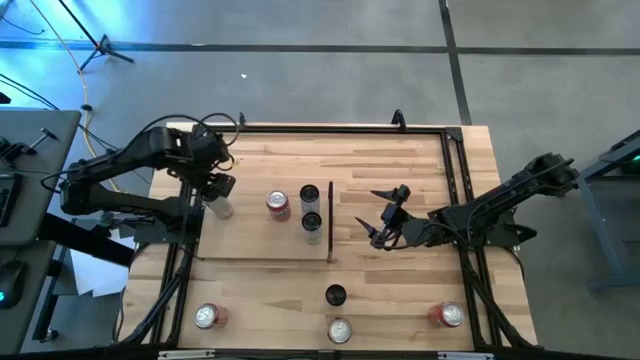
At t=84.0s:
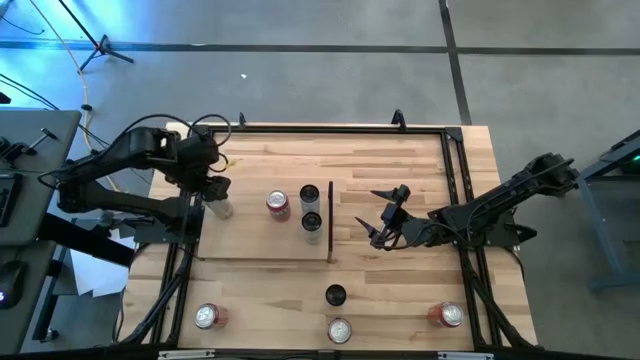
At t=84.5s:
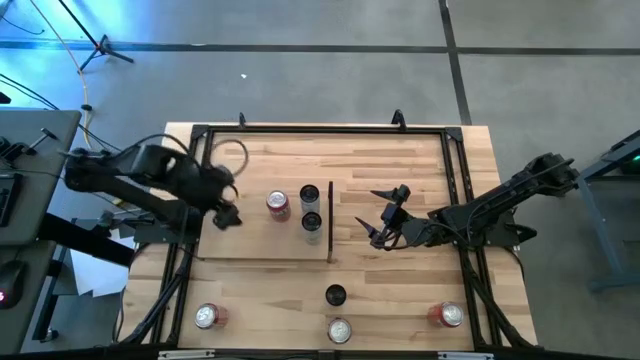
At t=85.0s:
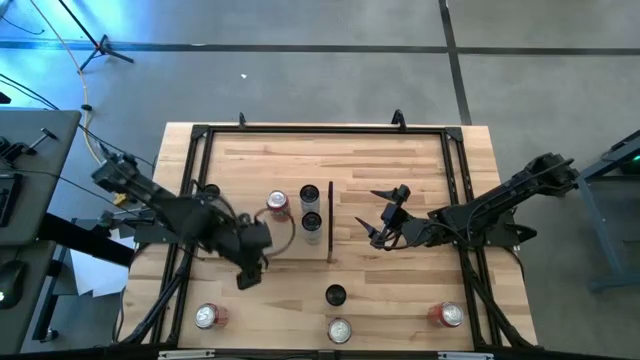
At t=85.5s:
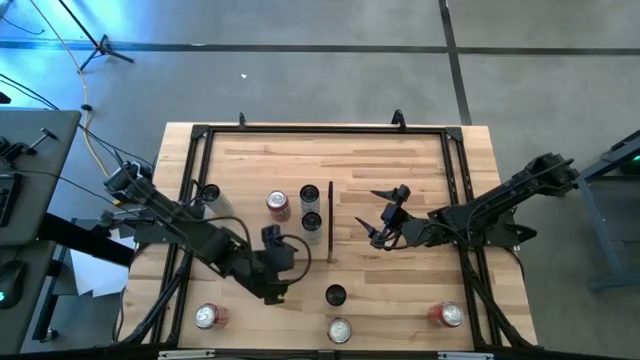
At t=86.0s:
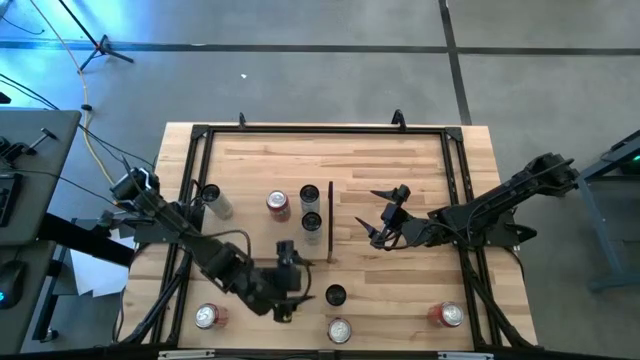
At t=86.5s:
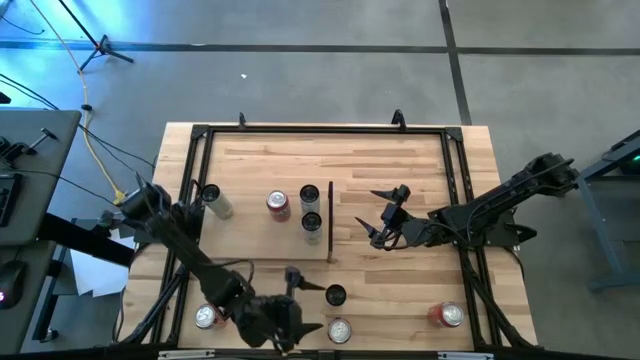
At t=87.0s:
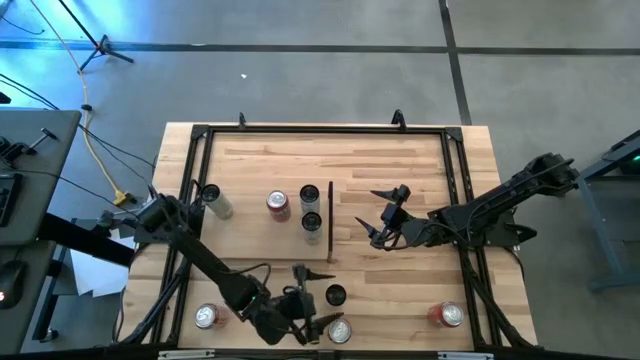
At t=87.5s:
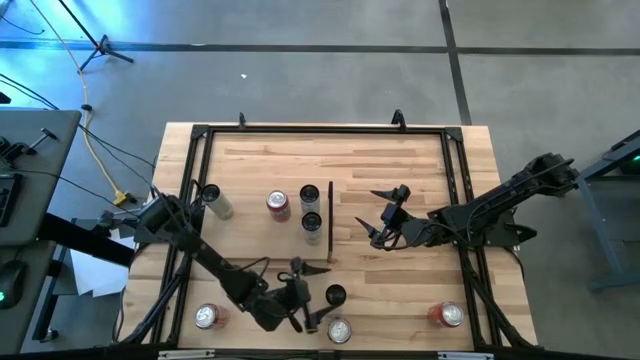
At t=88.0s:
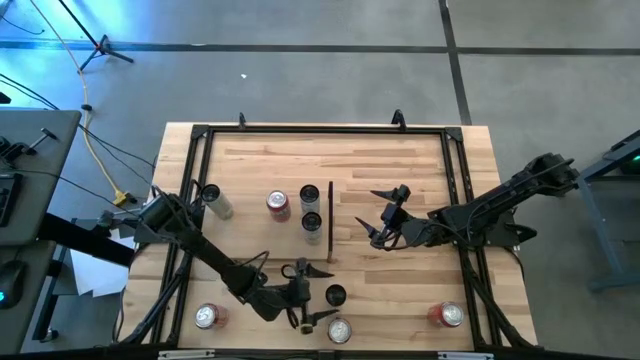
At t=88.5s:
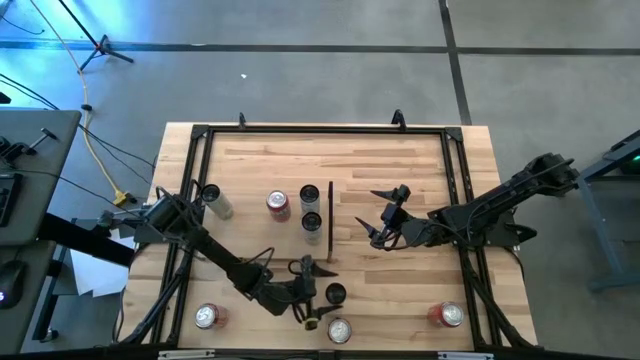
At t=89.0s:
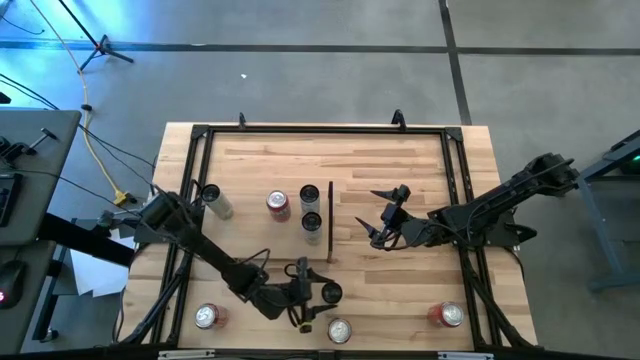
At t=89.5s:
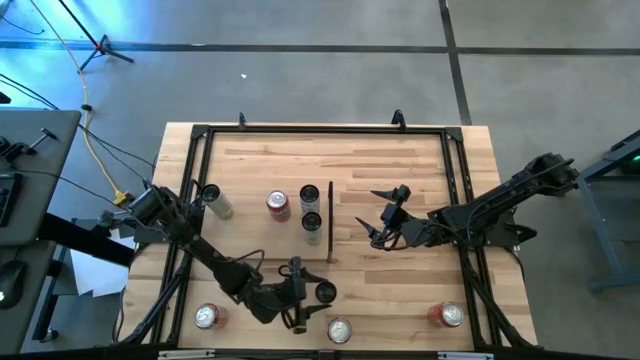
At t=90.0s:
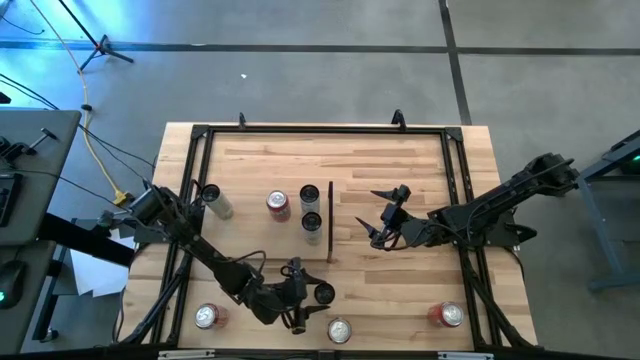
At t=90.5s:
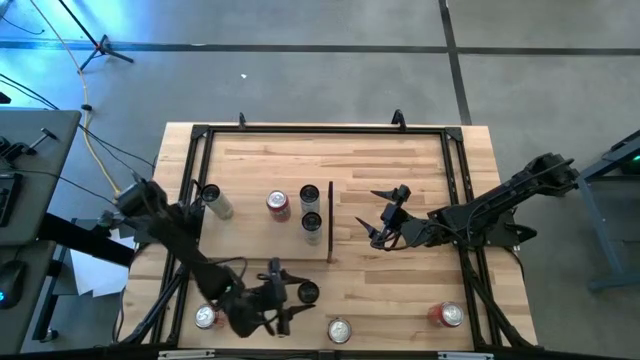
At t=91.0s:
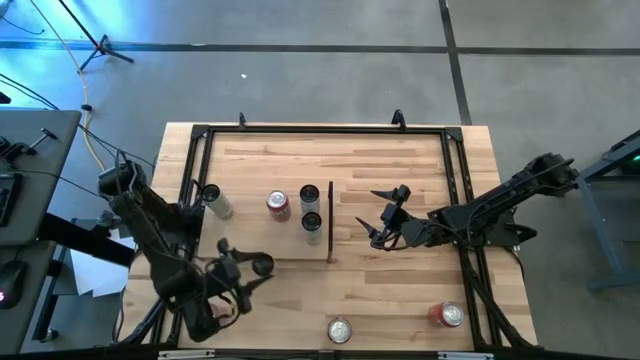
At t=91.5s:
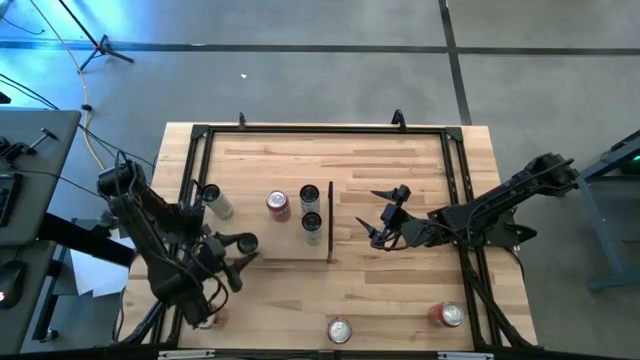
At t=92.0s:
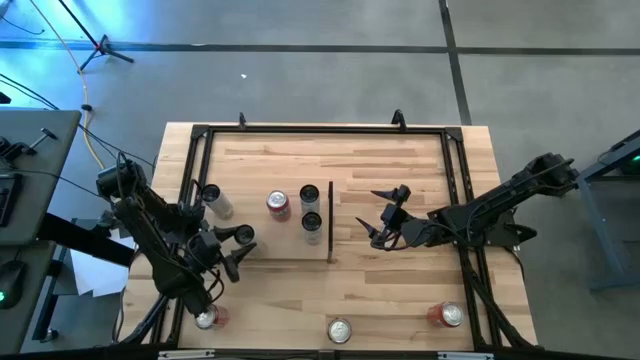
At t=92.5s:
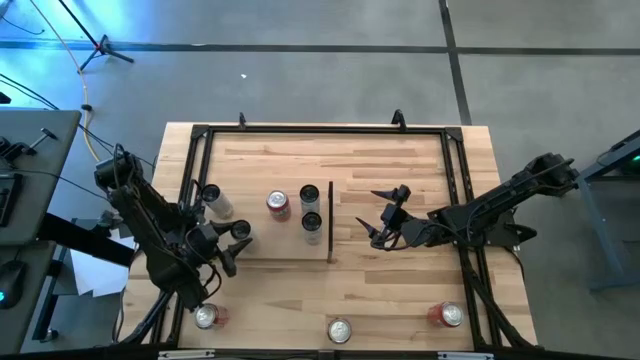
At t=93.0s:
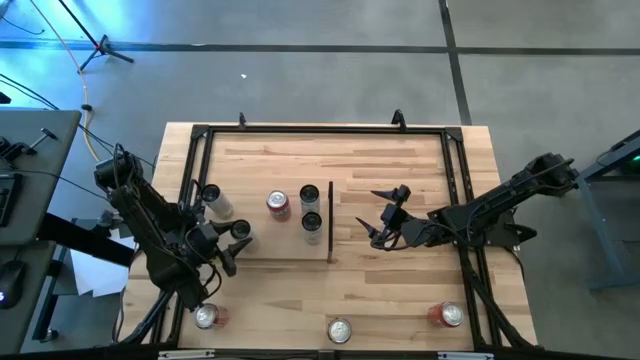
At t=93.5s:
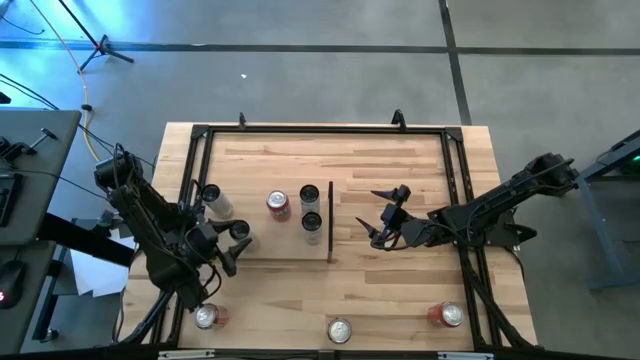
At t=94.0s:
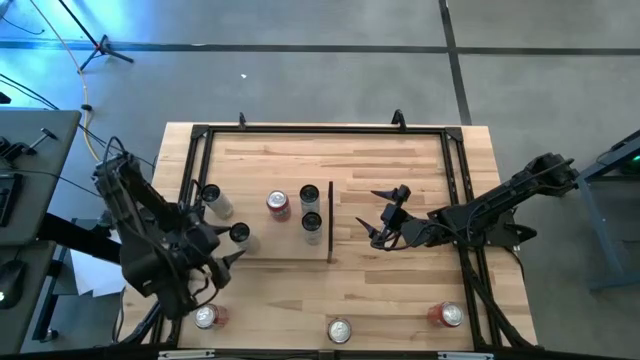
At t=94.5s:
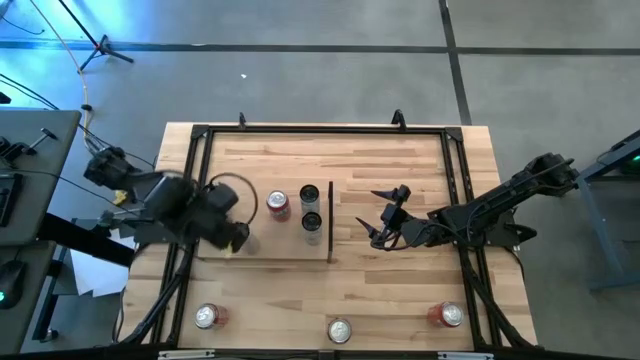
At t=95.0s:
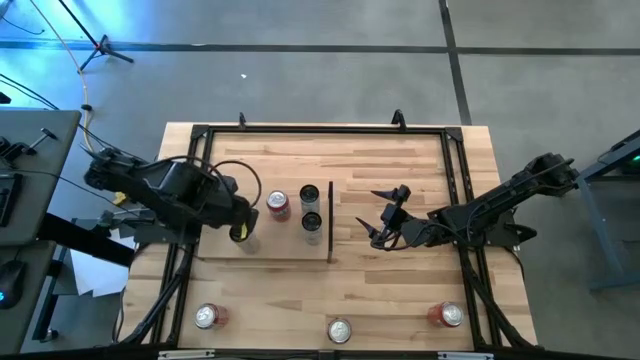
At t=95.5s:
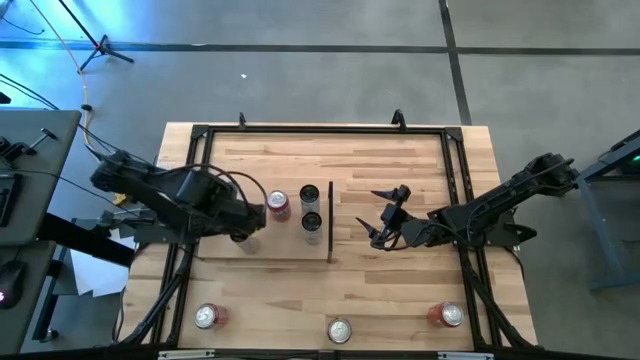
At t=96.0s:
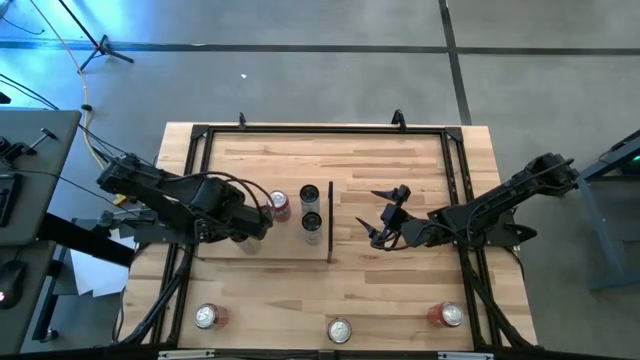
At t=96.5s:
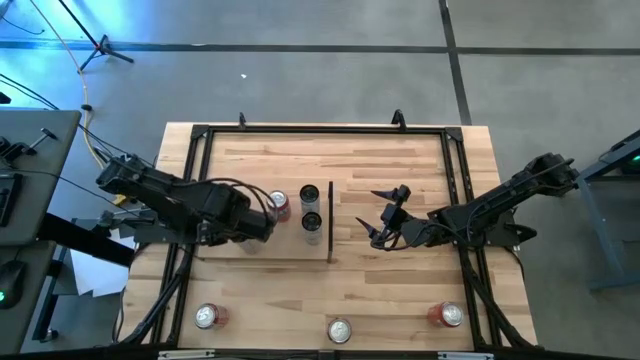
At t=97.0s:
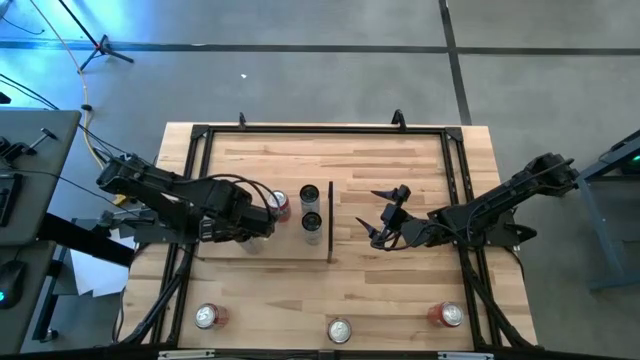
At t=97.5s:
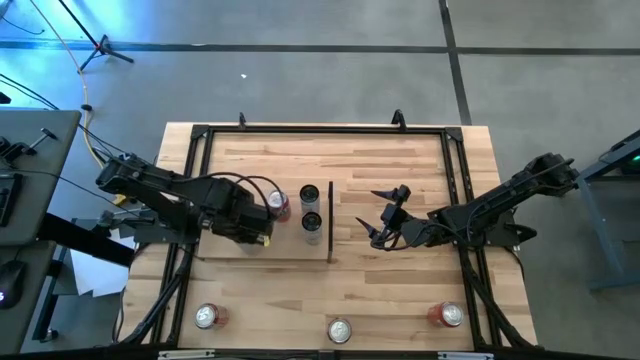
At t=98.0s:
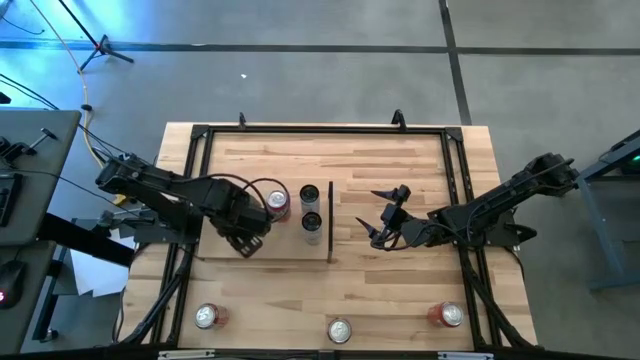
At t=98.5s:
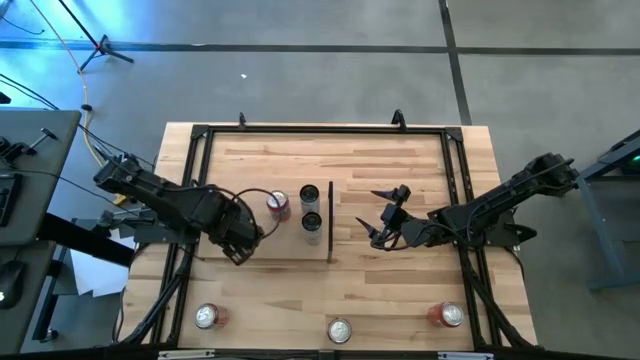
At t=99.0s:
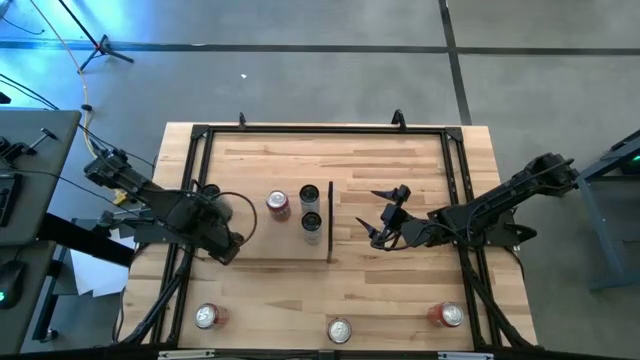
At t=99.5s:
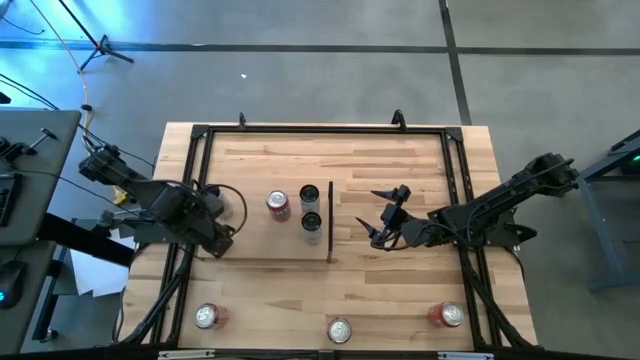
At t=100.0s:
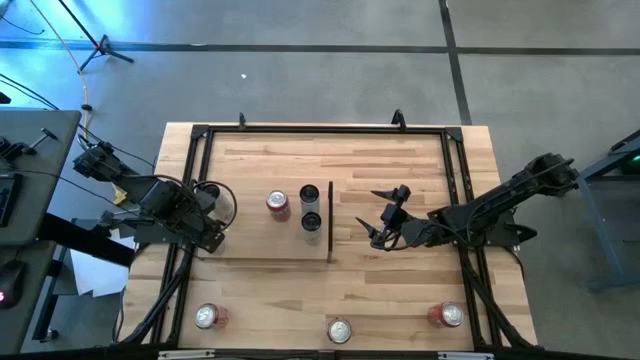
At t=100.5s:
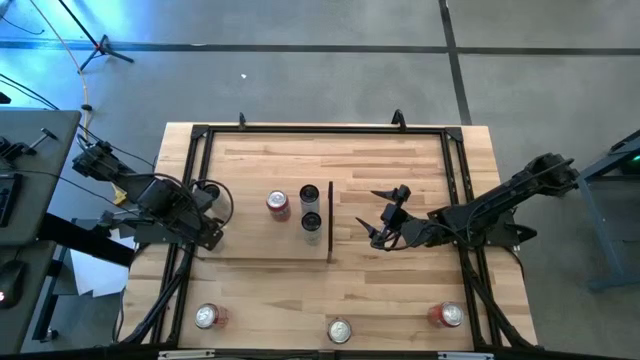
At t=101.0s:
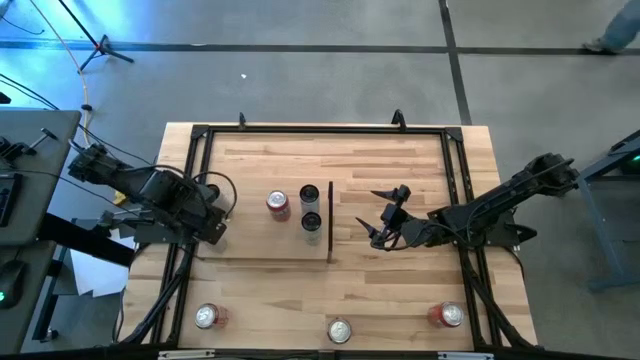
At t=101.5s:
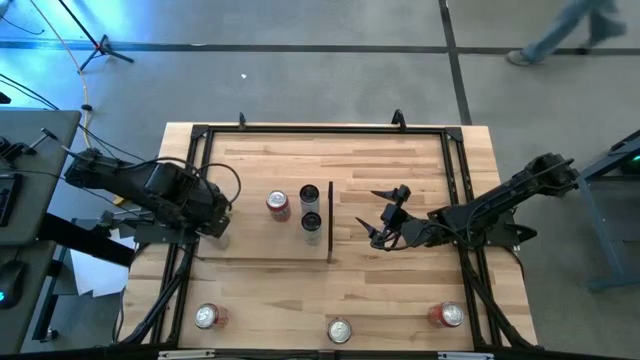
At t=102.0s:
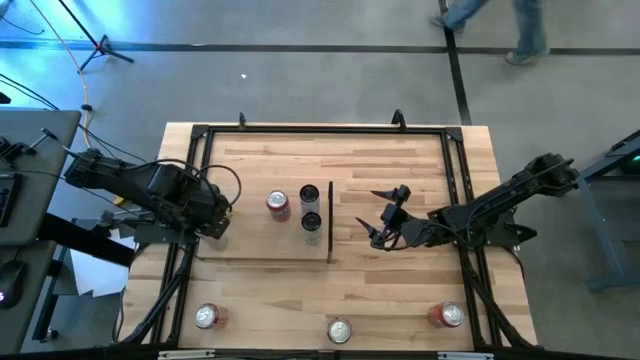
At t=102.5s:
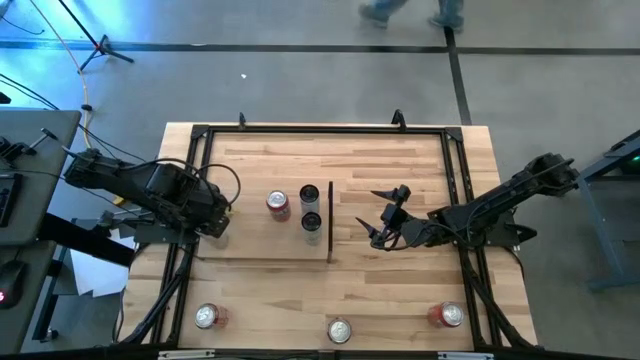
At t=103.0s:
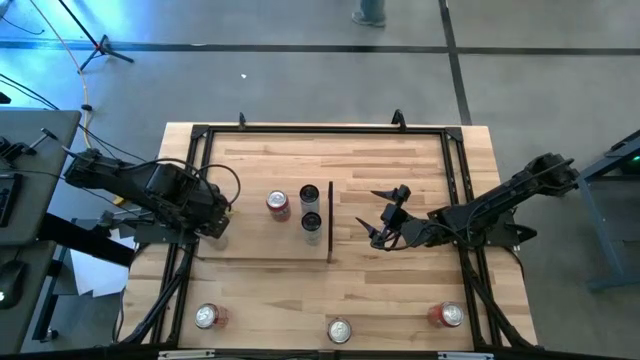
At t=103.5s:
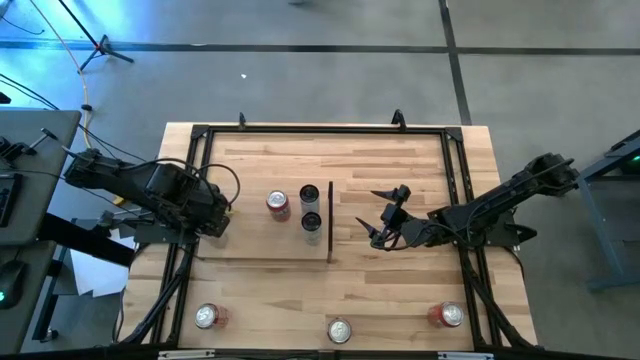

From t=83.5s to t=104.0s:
Task: Place canned beverage on shelf
Put the white yellow soda can aligned with the other white yellow soda can on the shelf
